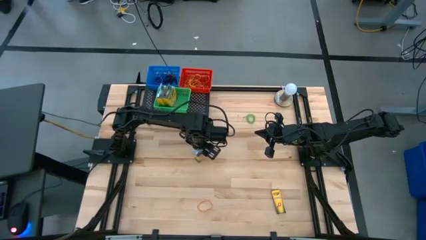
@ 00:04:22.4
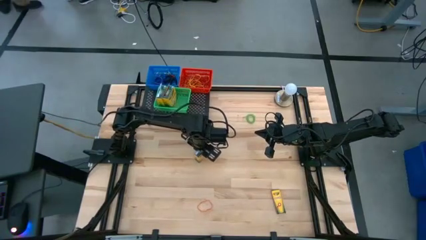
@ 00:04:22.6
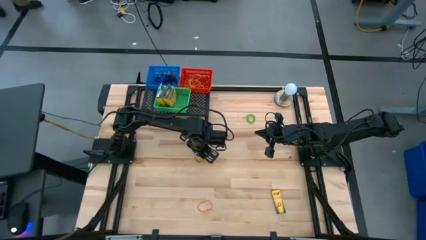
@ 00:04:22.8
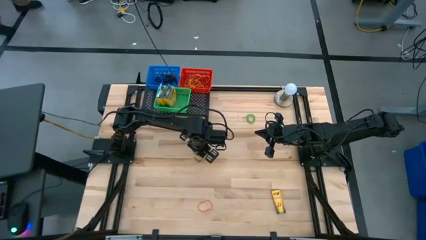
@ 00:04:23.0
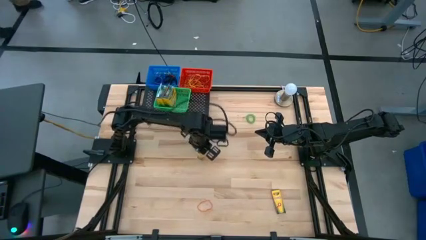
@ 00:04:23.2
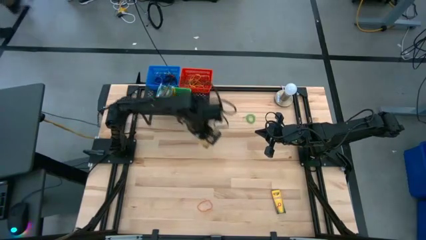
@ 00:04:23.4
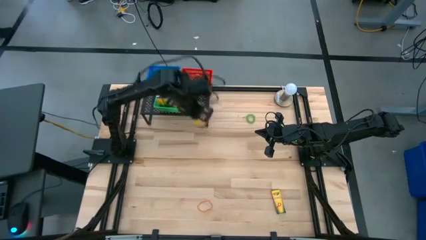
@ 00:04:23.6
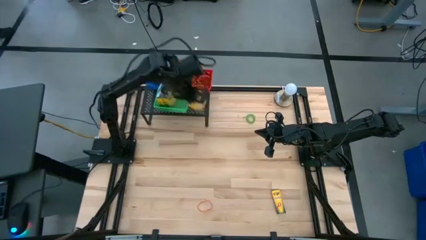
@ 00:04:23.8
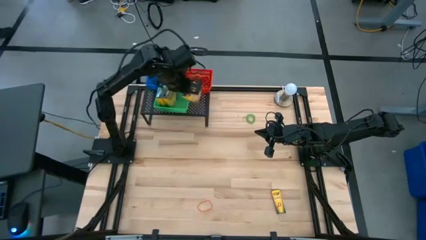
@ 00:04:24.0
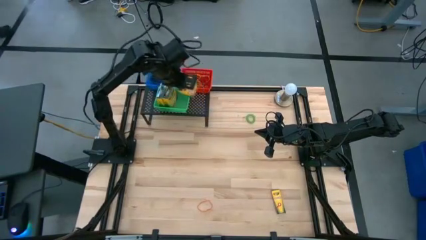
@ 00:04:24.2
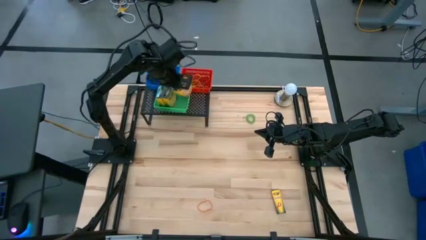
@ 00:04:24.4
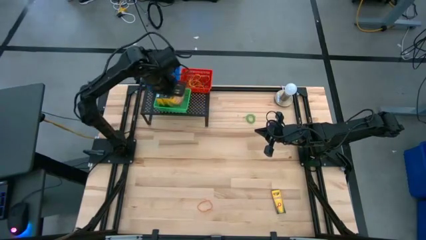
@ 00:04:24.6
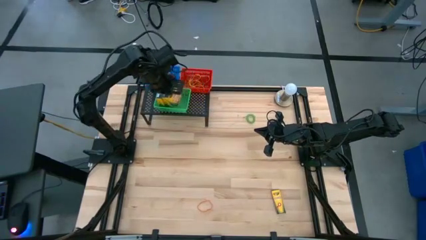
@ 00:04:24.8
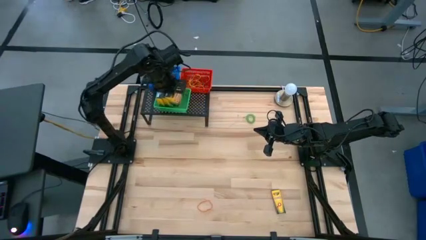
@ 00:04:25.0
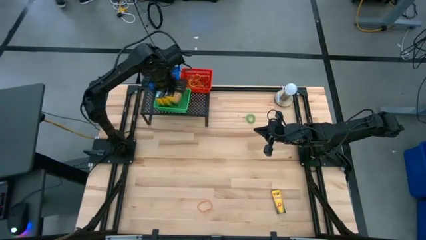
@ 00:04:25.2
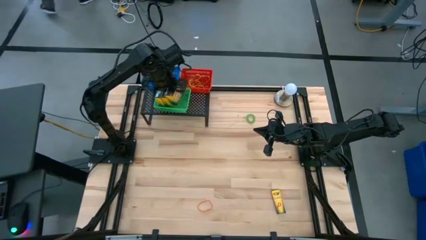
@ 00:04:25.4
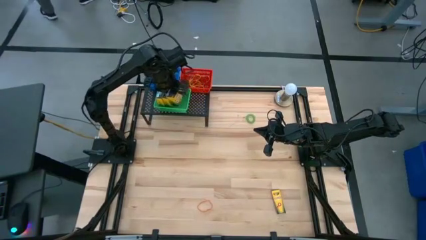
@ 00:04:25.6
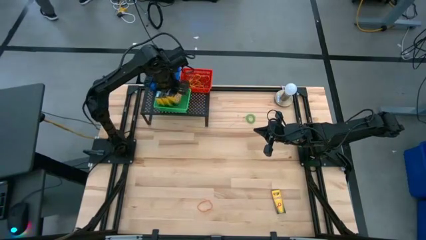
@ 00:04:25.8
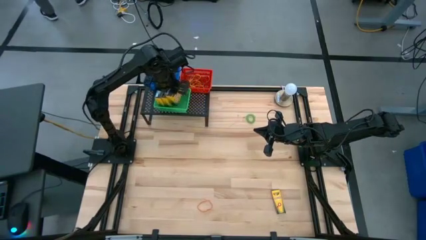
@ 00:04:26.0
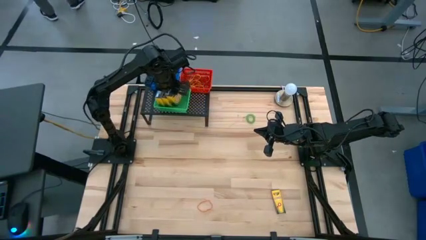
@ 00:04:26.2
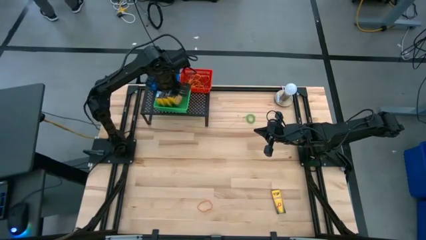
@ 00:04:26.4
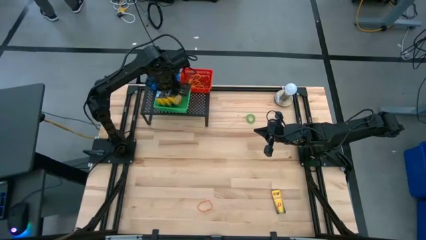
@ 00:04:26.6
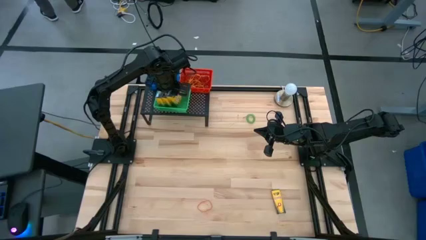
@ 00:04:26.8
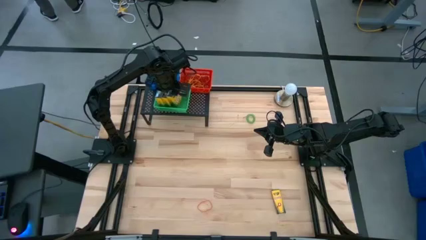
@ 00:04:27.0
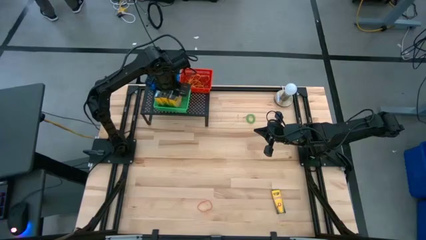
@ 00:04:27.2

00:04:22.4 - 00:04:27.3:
Task: Pick & Place Office Desk Supplies
Put the crayon box into the the green bin

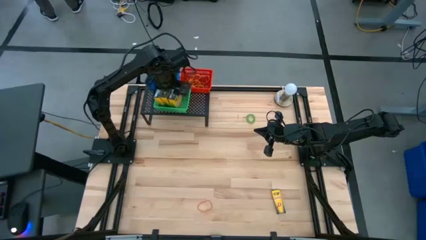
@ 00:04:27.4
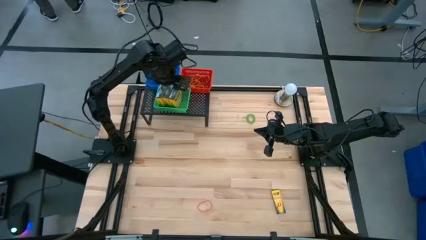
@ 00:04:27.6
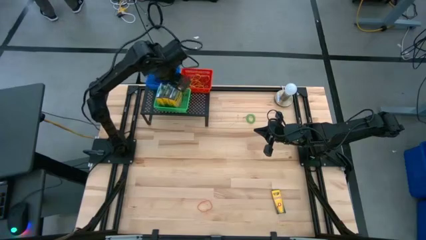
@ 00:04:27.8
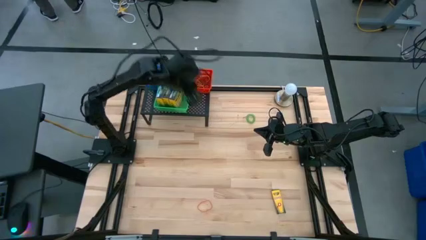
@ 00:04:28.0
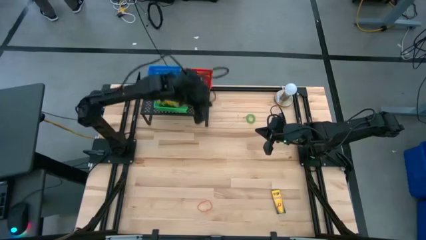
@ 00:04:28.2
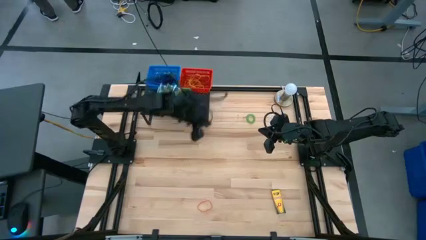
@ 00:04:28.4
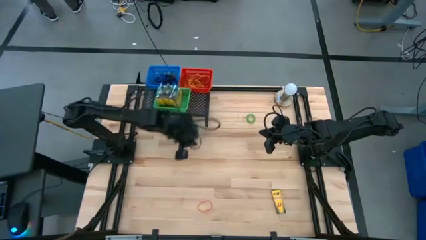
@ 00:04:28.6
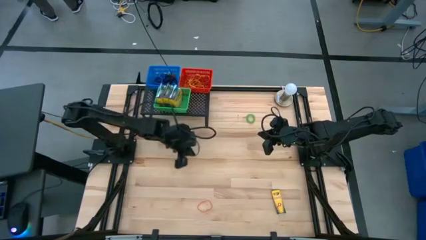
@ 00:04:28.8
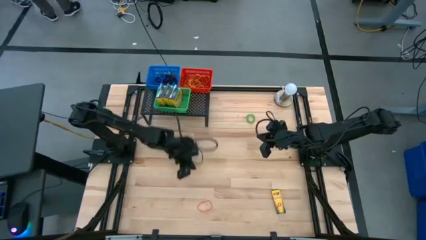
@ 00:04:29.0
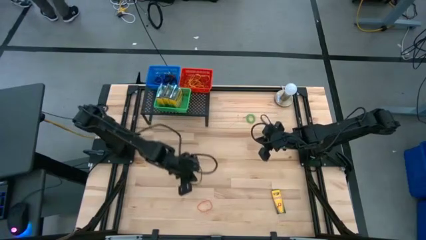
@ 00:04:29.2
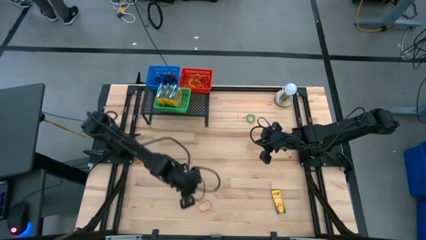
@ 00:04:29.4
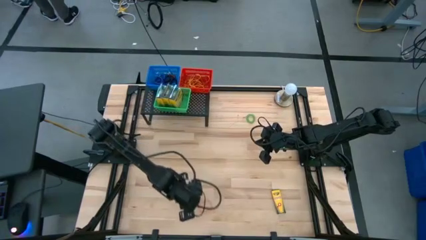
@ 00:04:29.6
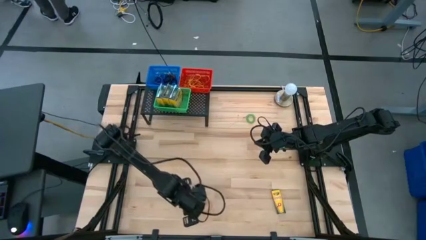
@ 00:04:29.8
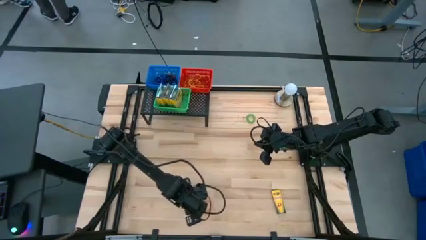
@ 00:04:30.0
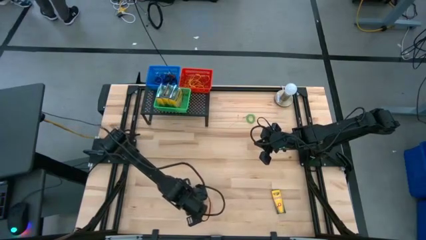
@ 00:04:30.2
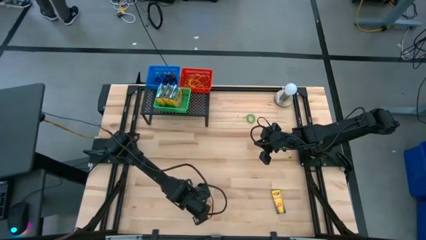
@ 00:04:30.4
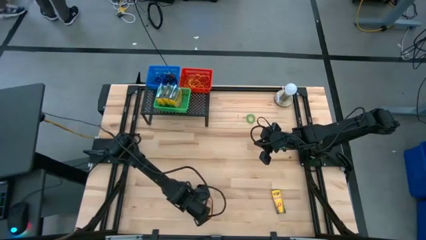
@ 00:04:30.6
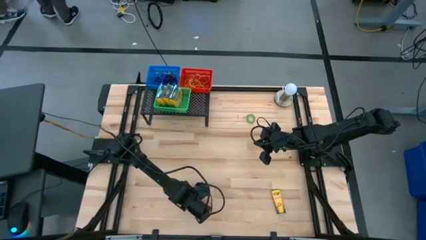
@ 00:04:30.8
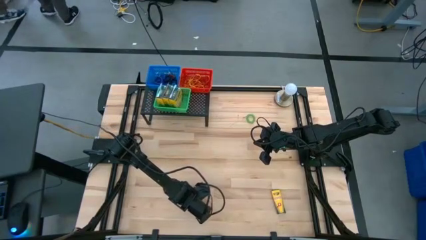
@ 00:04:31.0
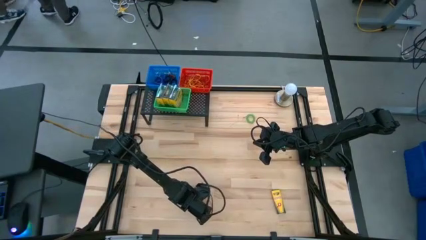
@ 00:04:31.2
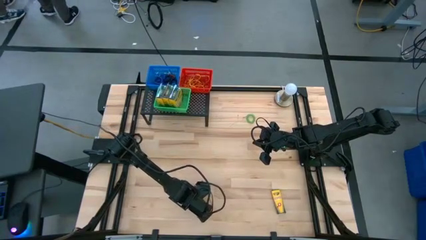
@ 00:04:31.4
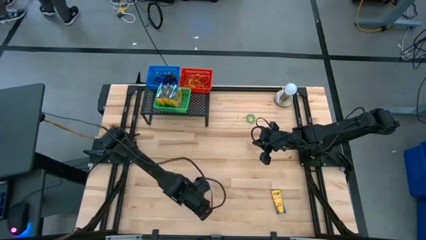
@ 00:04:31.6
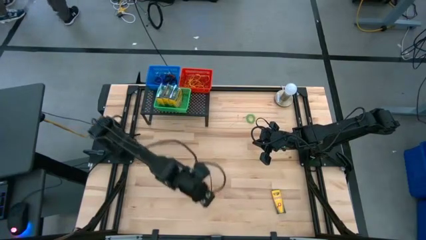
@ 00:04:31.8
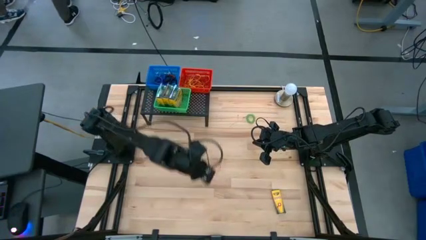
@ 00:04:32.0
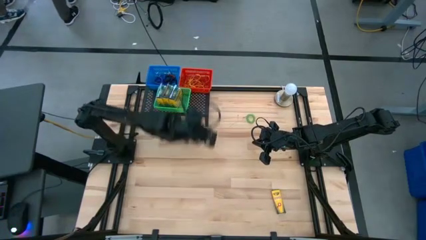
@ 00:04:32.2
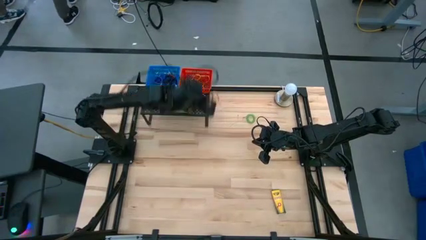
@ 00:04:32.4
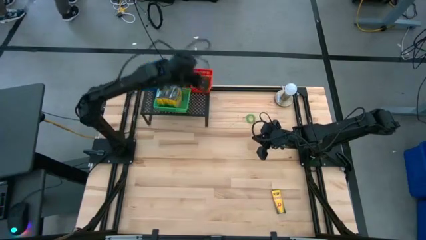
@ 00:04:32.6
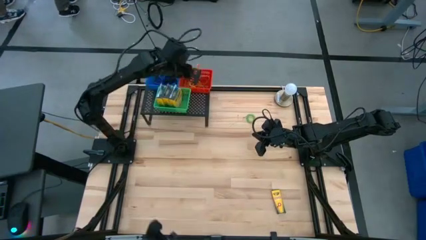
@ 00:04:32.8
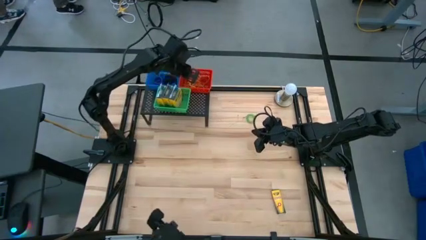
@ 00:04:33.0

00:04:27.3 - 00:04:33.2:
Put the orange rubber band into the red bin

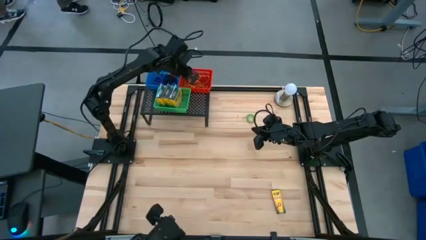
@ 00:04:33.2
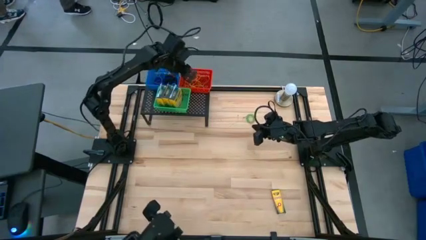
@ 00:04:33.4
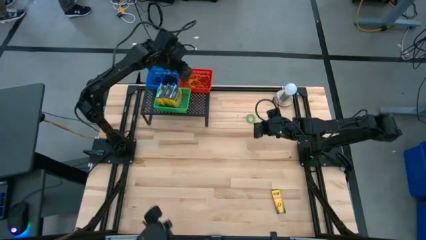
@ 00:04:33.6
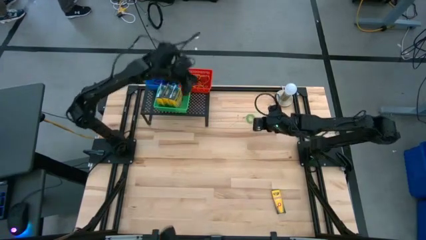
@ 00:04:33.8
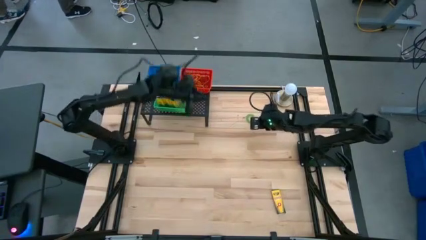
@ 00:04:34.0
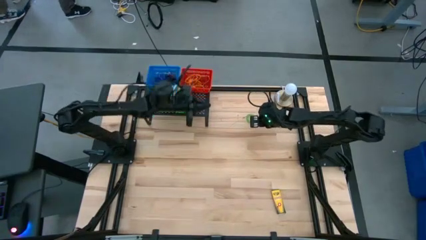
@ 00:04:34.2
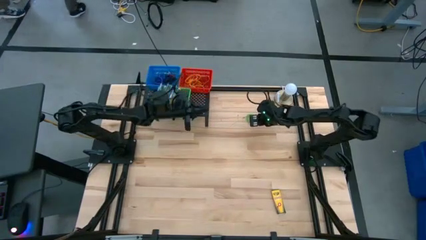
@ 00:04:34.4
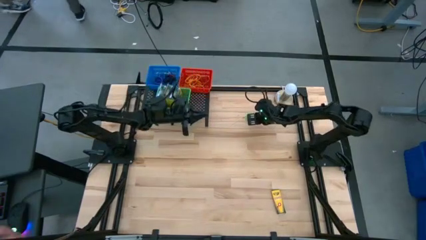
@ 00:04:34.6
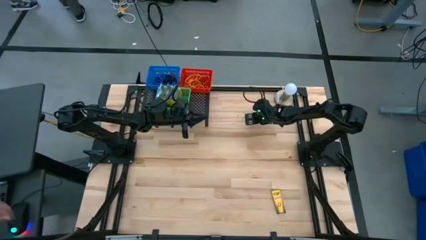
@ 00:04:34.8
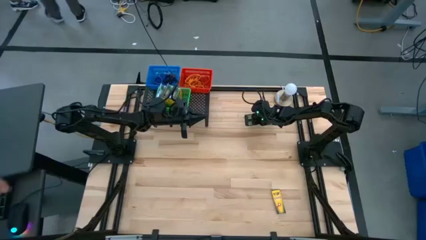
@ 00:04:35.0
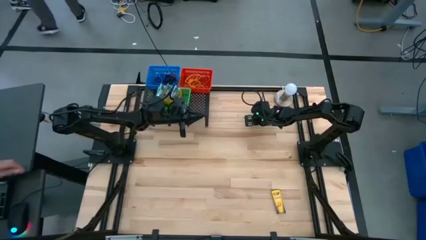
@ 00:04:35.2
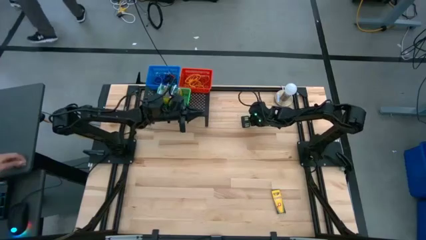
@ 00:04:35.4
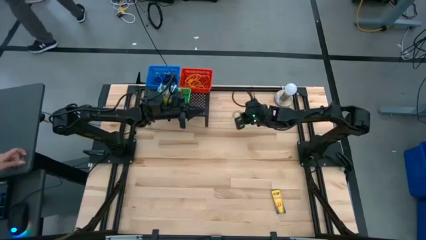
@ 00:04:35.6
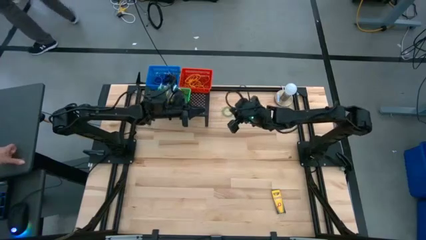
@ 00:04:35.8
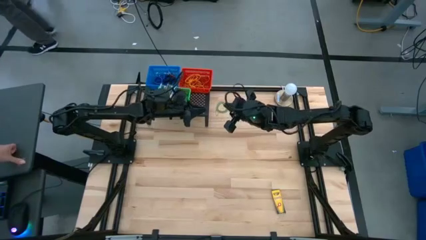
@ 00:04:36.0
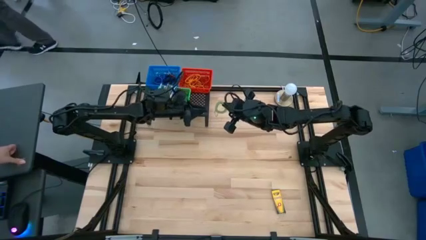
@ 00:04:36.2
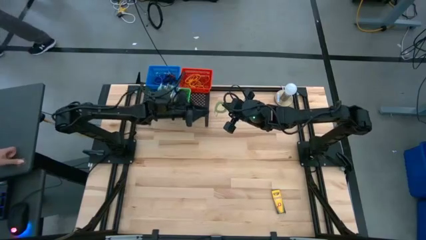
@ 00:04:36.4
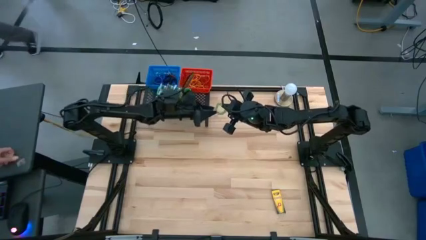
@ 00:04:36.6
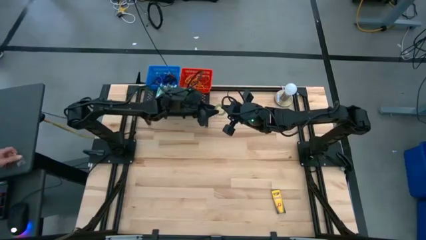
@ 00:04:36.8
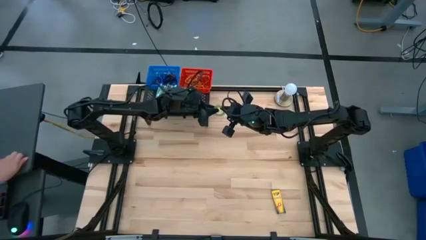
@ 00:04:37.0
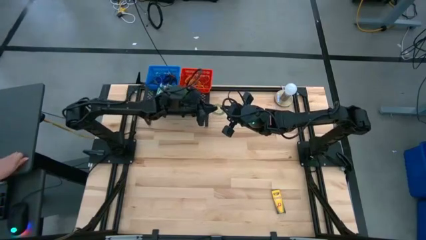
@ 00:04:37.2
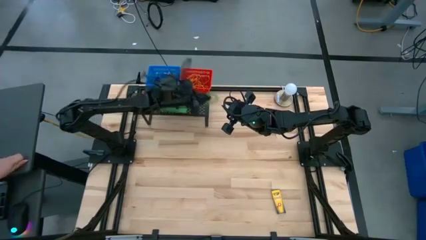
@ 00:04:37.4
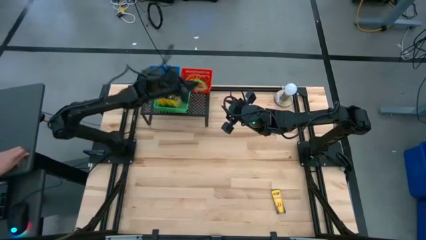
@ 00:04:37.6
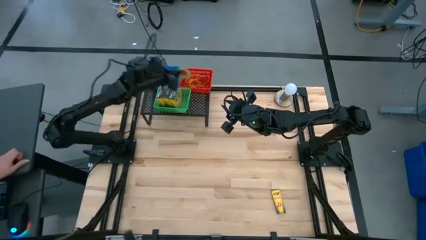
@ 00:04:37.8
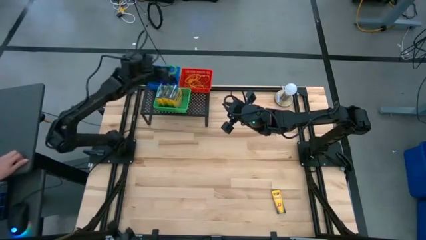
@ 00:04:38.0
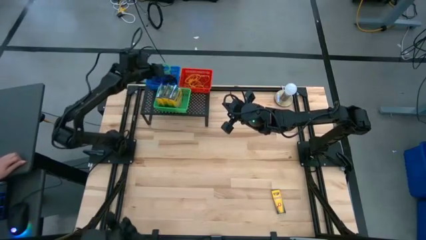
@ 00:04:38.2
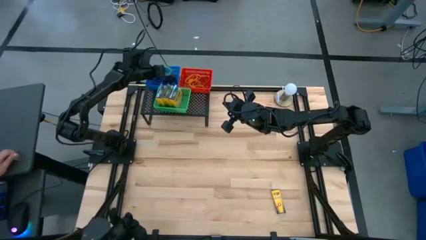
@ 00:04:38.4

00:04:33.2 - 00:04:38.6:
Put the green spring keychain into the blue bin
